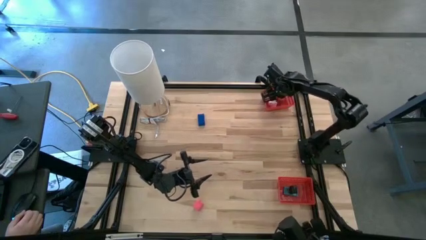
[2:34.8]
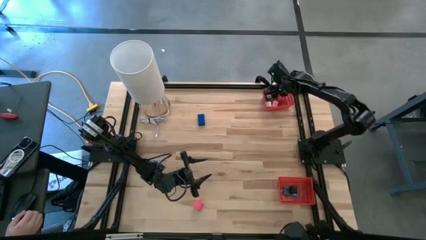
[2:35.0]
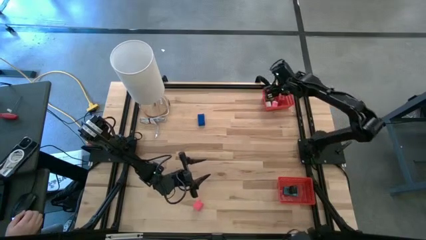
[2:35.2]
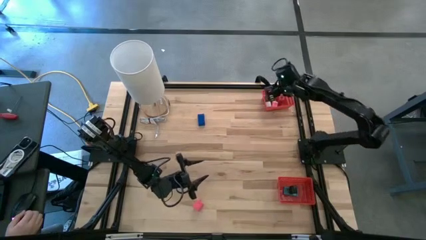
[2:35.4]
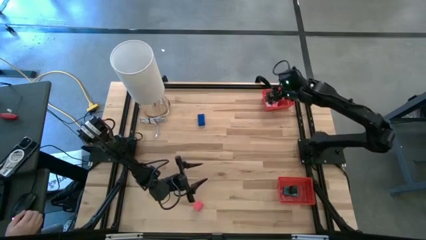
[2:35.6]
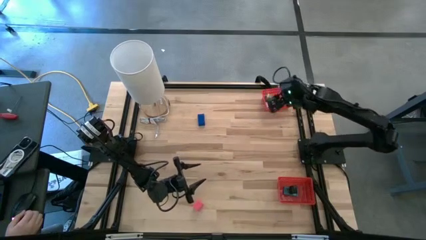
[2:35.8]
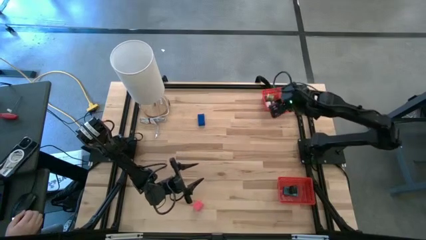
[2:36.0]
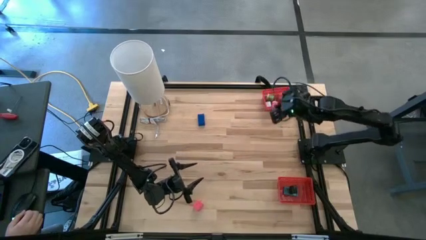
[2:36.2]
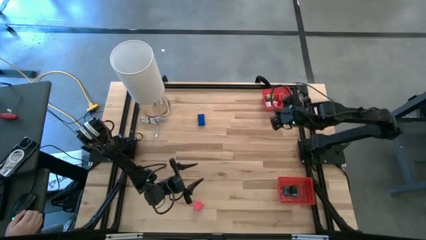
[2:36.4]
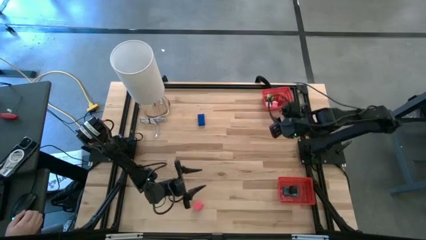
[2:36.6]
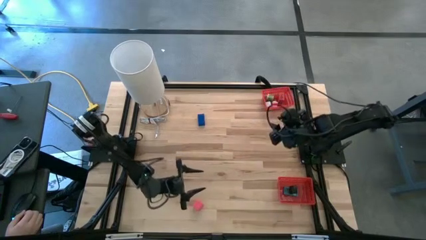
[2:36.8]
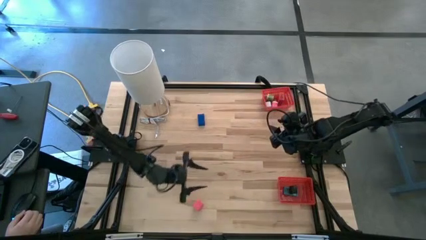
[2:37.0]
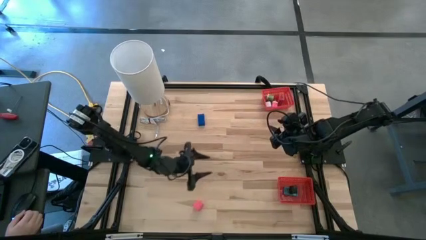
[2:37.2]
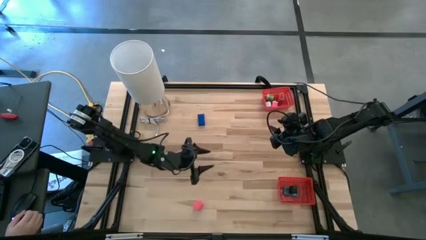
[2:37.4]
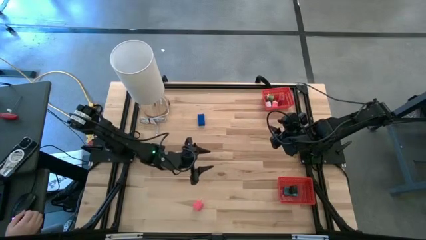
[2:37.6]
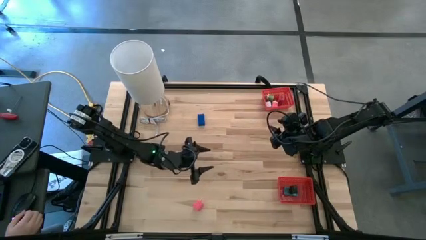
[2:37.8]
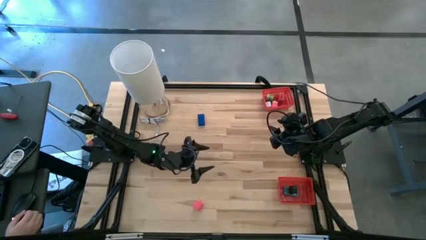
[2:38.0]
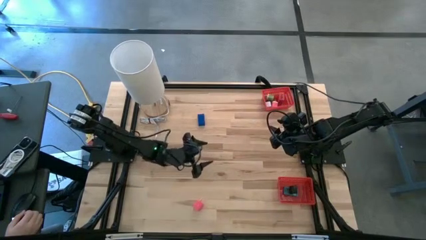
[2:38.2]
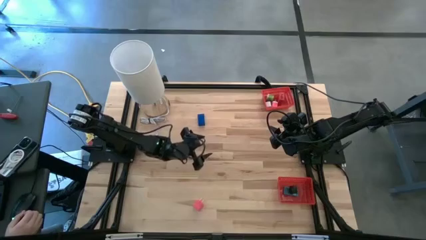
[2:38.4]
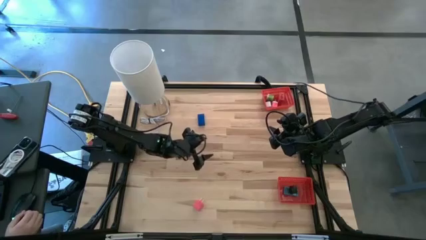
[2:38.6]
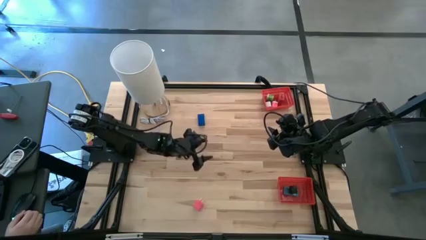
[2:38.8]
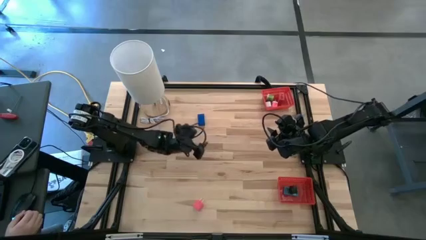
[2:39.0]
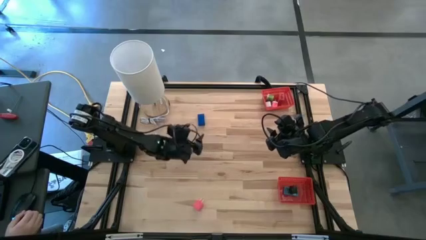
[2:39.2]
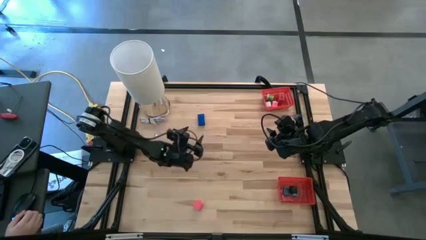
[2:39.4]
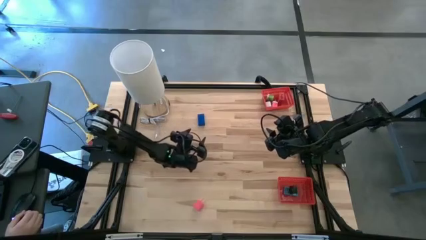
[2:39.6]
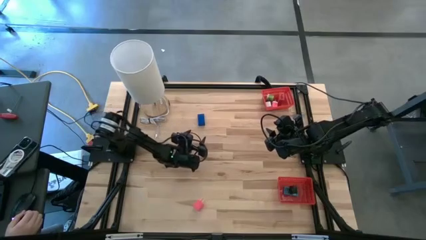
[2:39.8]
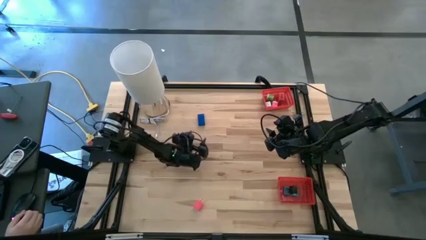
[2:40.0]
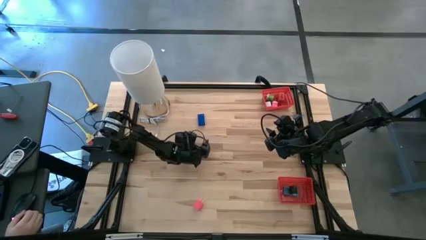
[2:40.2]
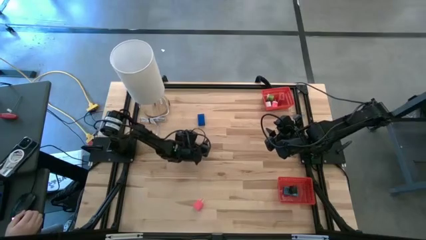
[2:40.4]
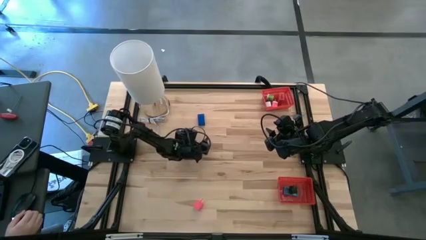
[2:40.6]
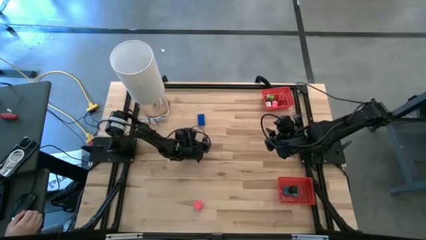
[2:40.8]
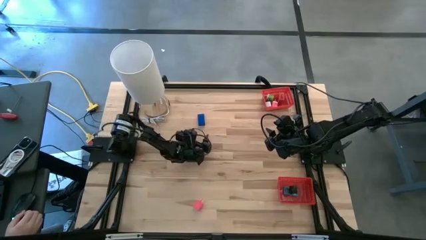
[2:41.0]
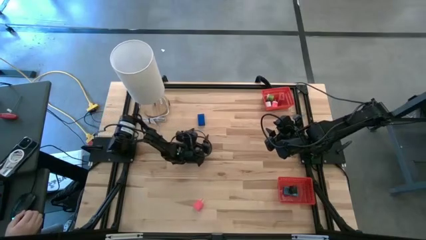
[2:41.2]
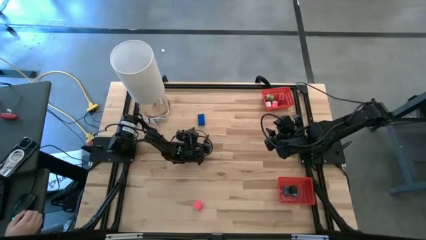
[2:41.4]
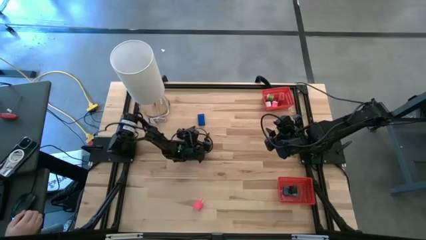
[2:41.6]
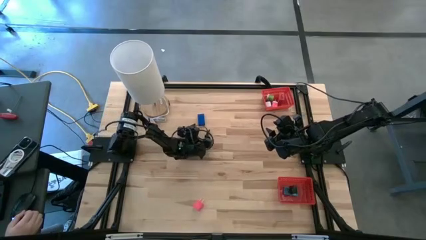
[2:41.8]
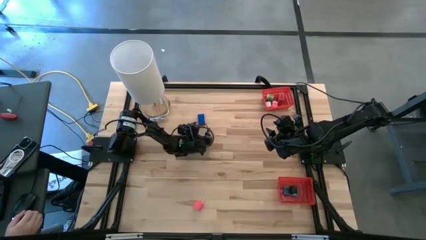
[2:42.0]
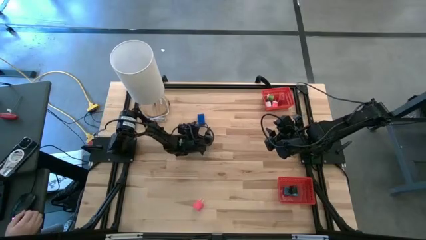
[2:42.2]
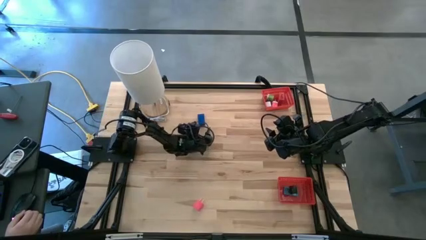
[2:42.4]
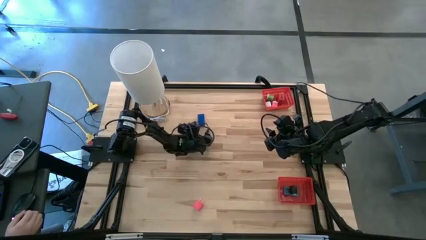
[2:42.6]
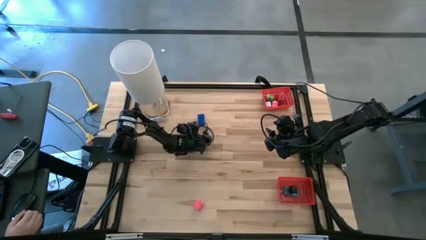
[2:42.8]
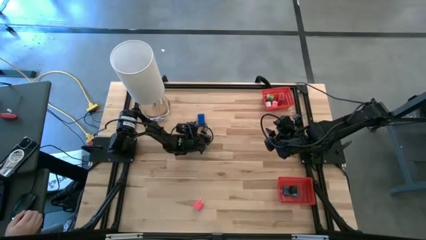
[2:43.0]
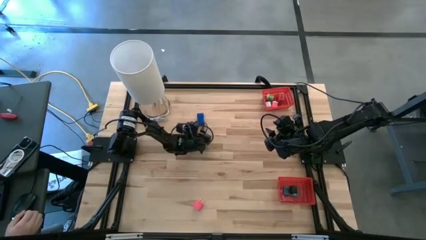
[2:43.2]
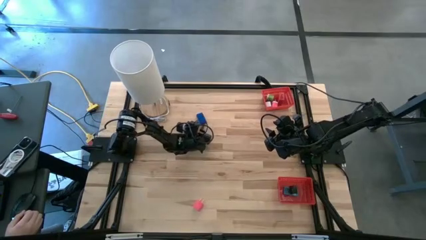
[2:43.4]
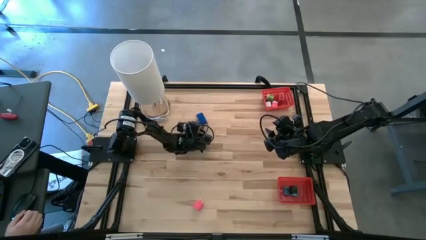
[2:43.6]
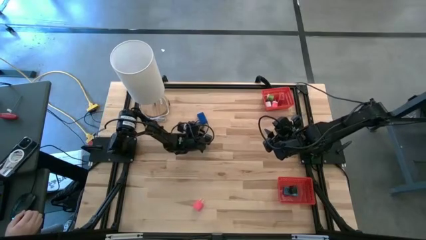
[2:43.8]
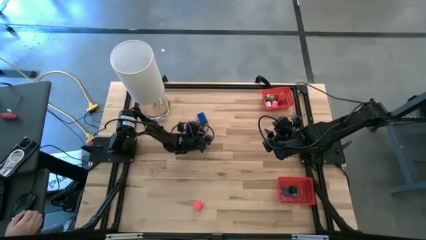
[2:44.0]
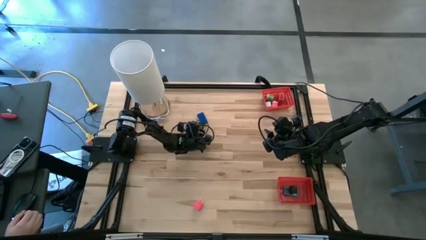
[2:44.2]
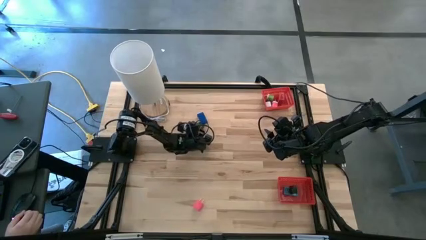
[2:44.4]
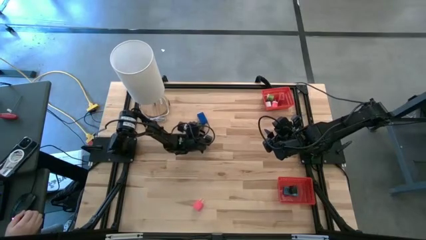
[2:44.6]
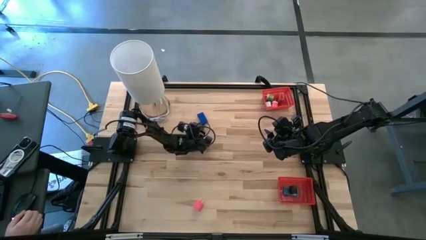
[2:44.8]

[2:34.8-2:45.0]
Task: Pick & Place Office items
Put the blue digital clock into the bottom red basket

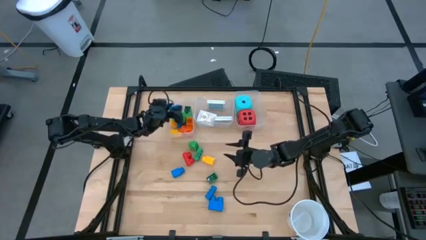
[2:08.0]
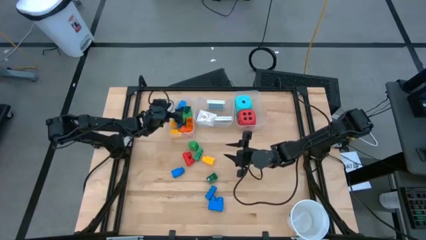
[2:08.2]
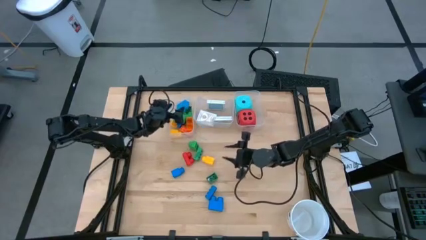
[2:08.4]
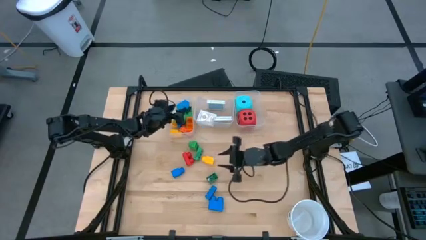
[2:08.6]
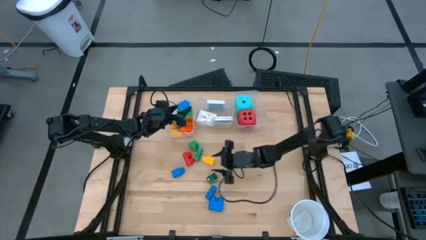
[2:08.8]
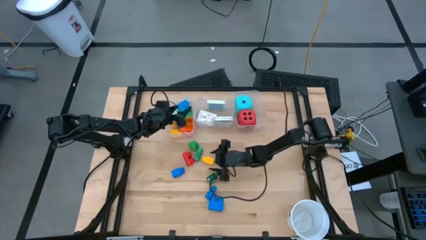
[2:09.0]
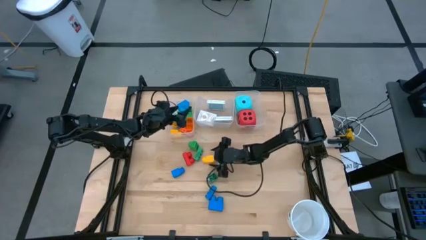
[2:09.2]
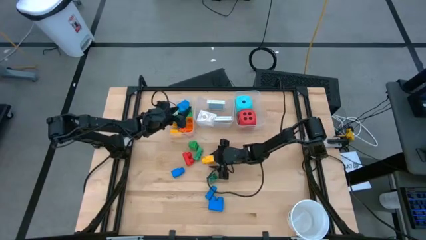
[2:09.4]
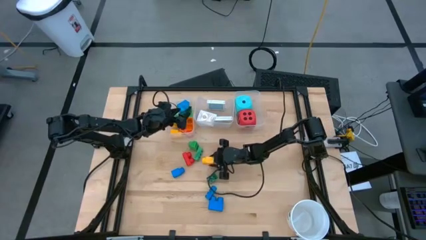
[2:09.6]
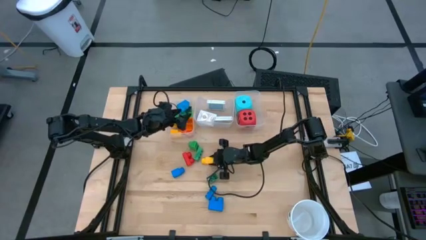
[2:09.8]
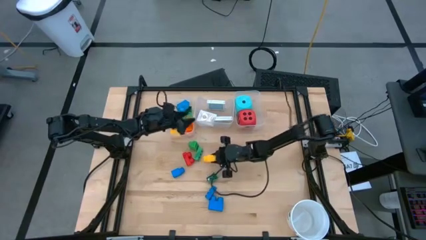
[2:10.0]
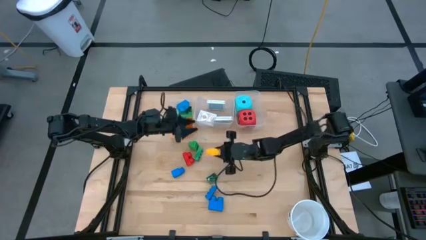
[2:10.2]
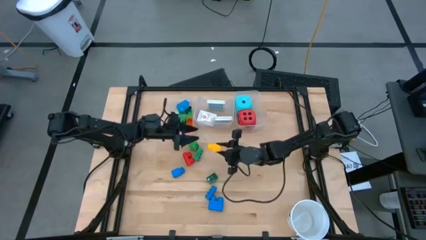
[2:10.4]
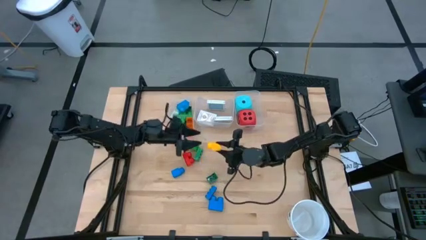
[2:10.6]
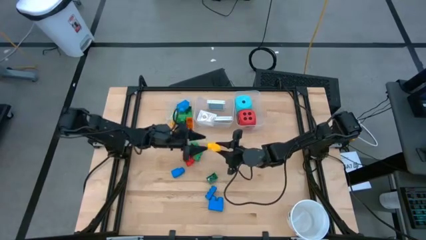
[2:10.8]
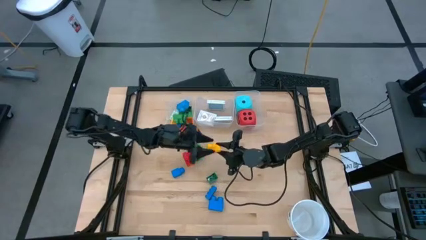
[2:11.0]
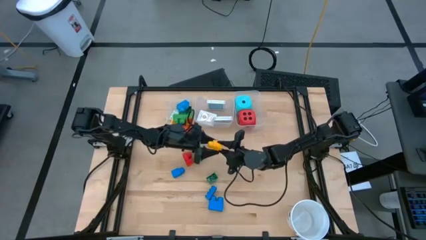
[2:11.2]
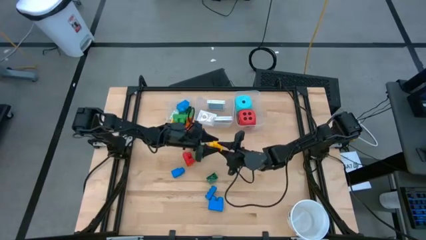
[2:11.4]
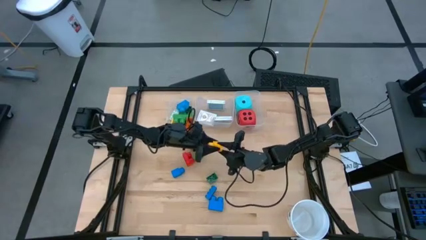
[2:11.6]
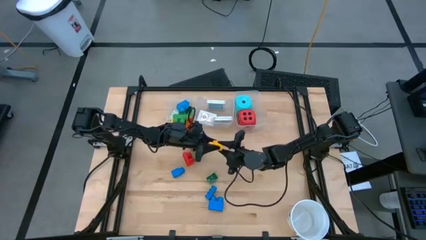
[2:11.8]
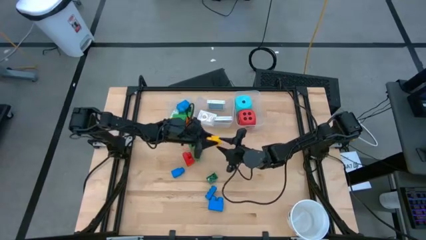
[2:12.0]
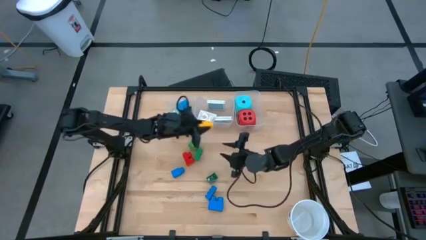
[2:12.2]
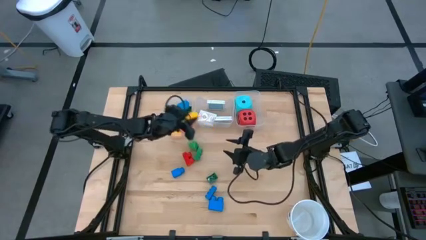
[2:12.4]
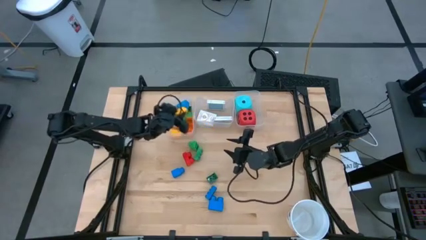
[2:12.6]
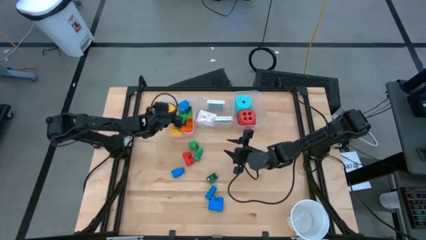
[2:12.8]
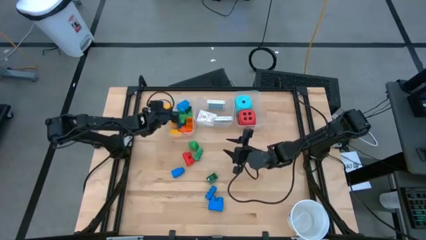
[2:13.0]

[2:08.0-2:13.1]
Task: Pick & Place Toys
Put the yellow game piece into the left transparent bin
